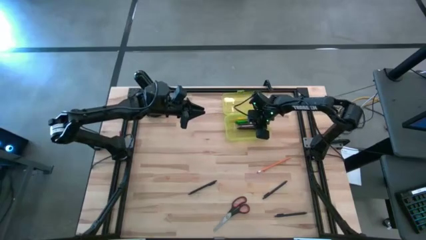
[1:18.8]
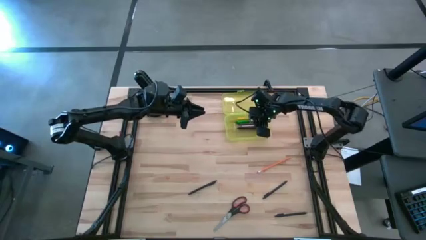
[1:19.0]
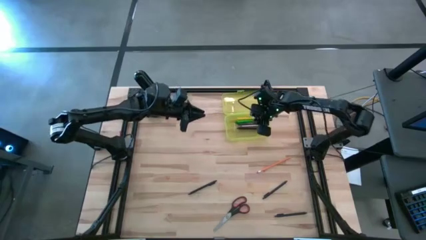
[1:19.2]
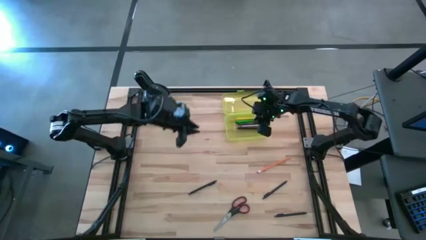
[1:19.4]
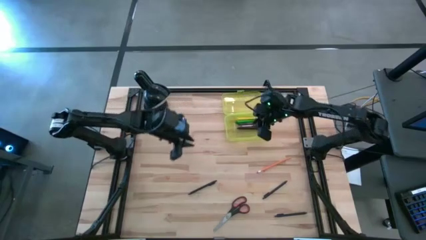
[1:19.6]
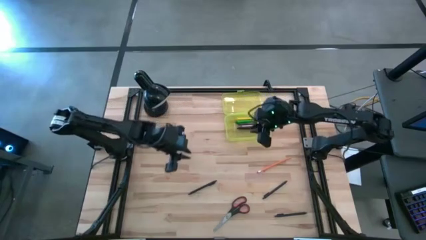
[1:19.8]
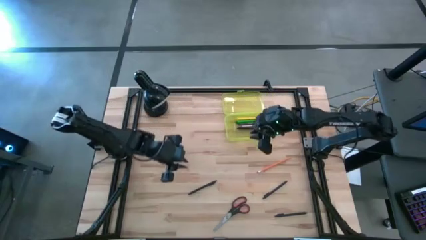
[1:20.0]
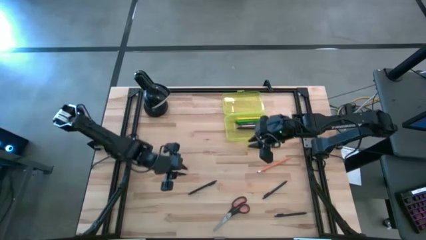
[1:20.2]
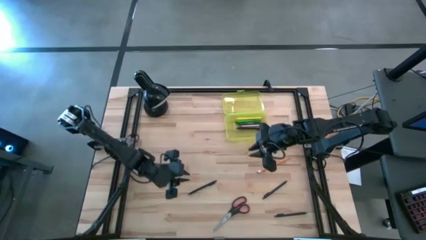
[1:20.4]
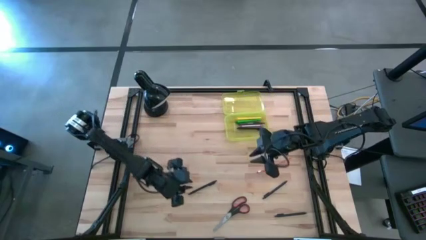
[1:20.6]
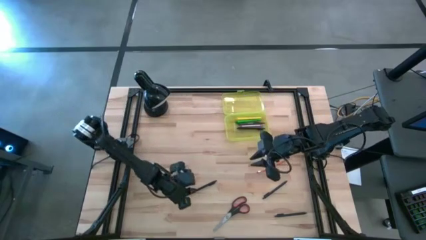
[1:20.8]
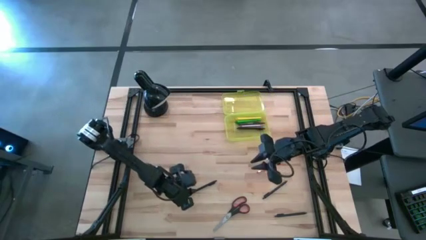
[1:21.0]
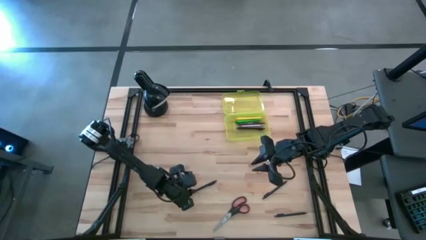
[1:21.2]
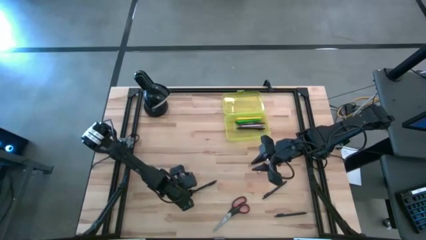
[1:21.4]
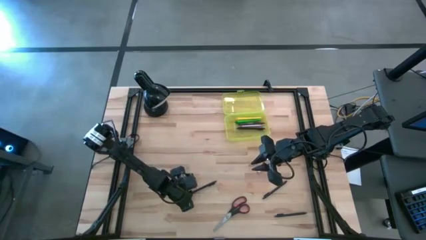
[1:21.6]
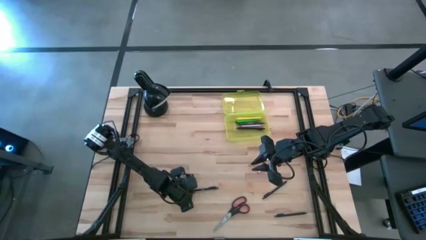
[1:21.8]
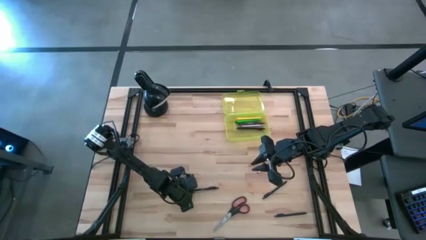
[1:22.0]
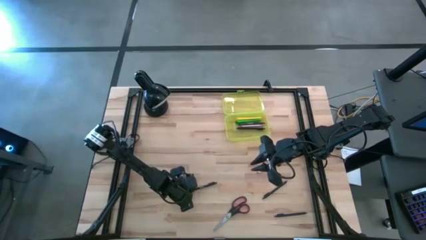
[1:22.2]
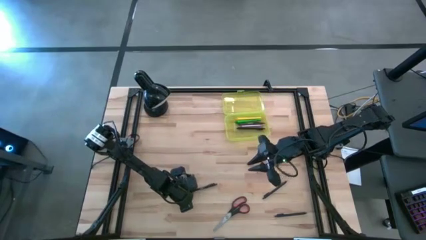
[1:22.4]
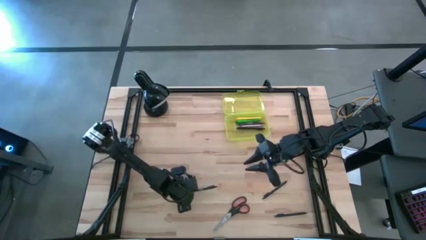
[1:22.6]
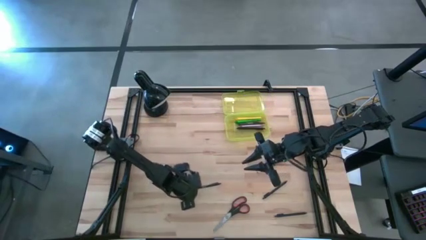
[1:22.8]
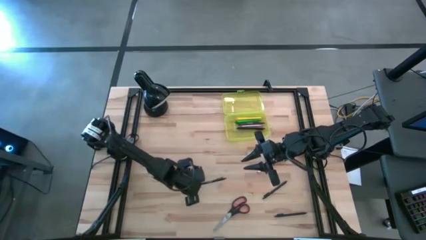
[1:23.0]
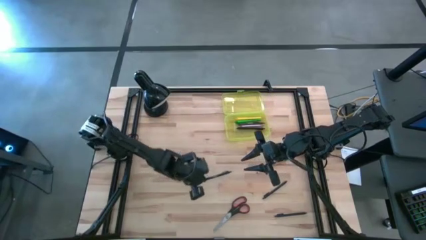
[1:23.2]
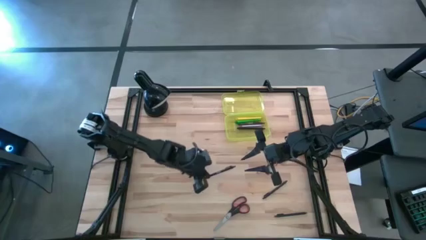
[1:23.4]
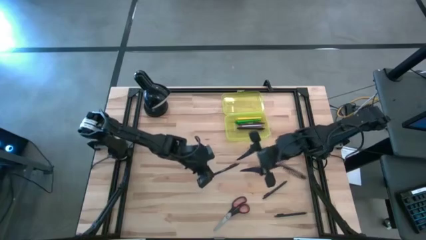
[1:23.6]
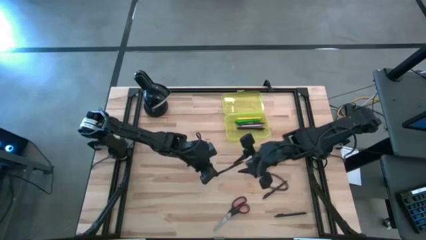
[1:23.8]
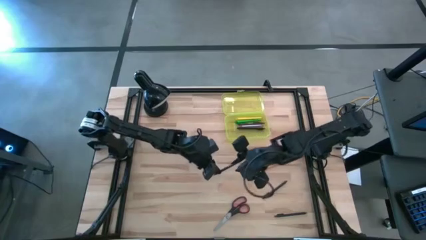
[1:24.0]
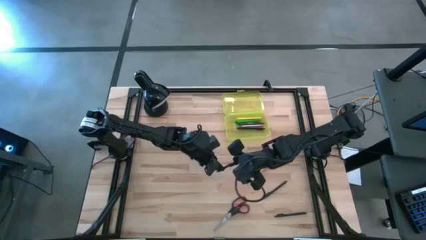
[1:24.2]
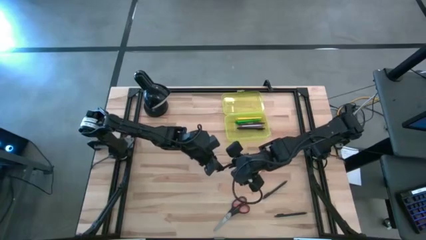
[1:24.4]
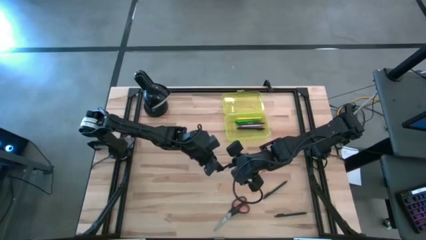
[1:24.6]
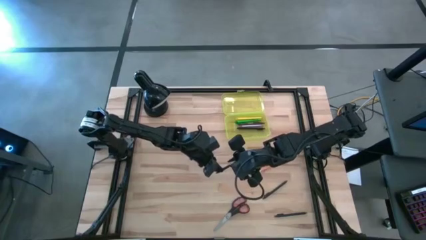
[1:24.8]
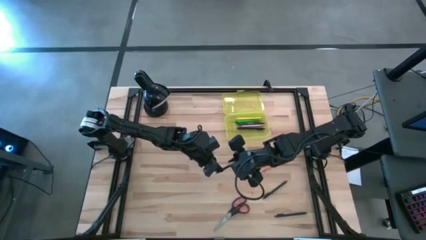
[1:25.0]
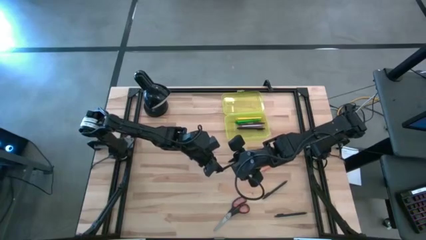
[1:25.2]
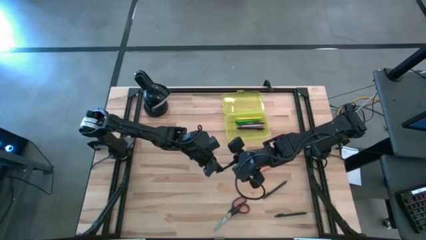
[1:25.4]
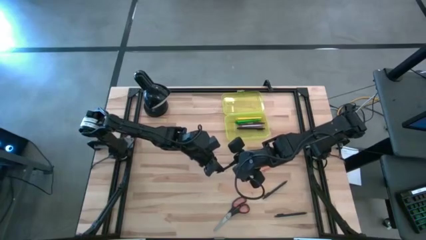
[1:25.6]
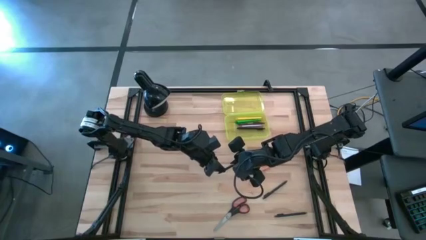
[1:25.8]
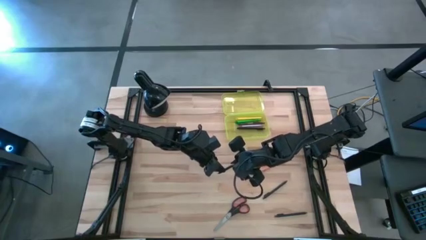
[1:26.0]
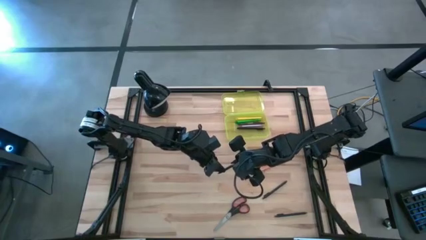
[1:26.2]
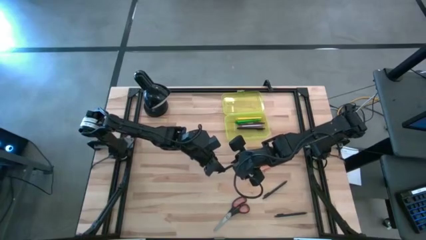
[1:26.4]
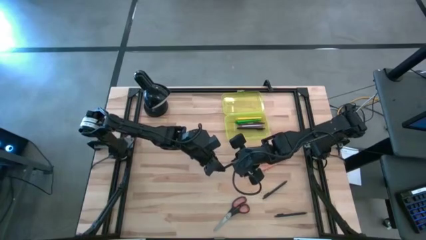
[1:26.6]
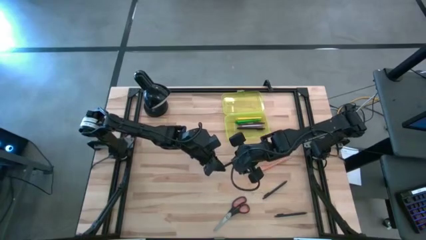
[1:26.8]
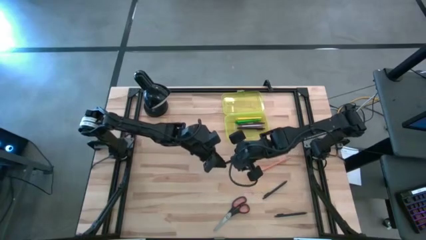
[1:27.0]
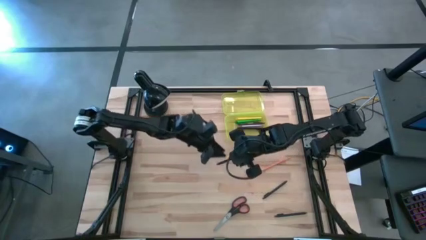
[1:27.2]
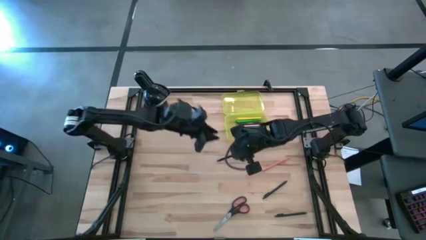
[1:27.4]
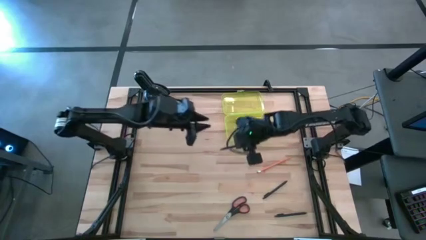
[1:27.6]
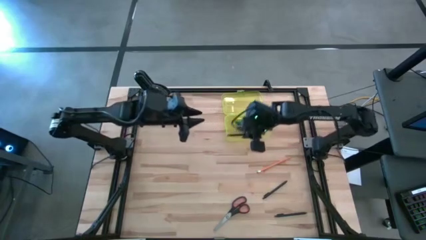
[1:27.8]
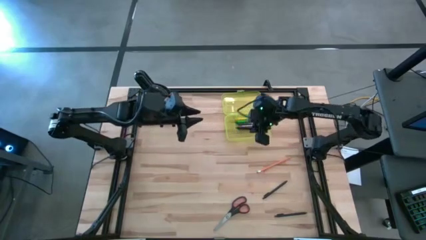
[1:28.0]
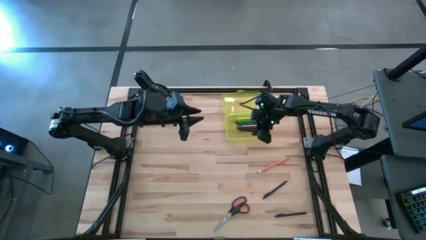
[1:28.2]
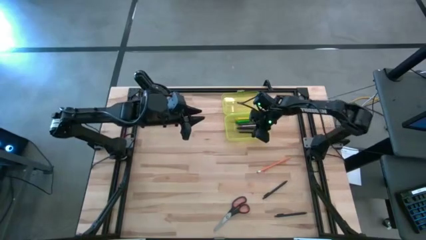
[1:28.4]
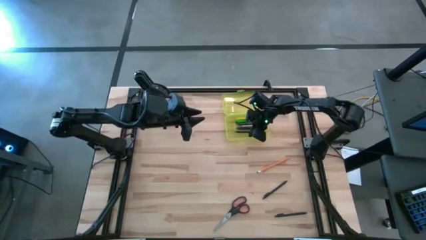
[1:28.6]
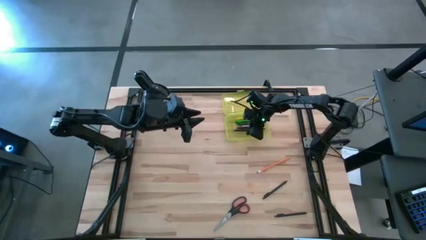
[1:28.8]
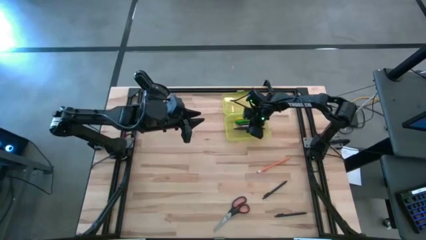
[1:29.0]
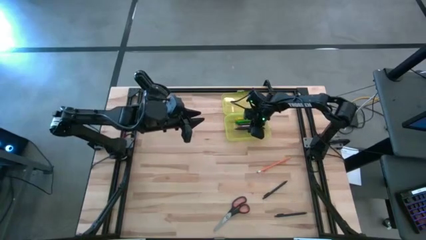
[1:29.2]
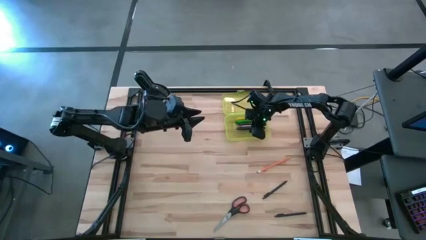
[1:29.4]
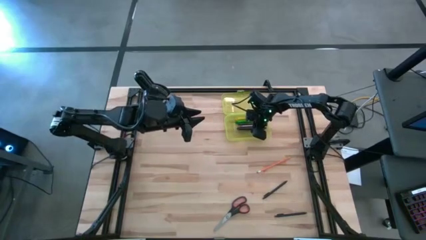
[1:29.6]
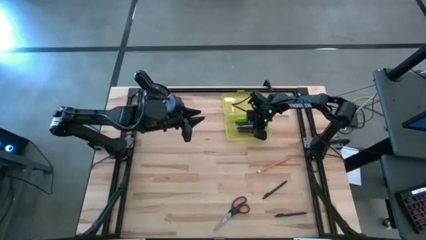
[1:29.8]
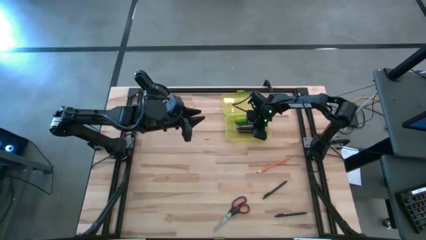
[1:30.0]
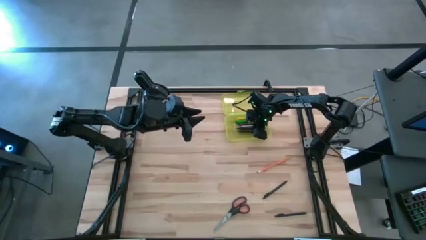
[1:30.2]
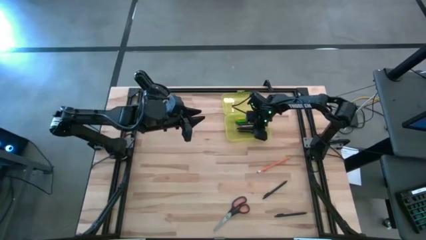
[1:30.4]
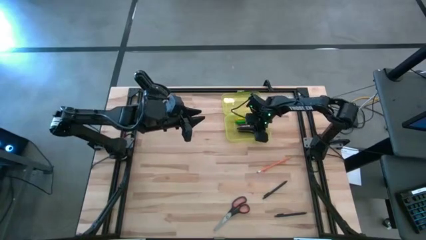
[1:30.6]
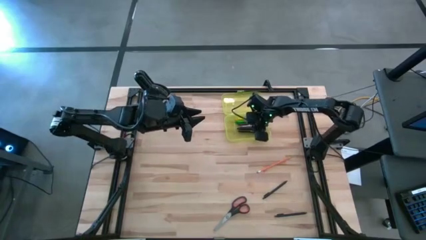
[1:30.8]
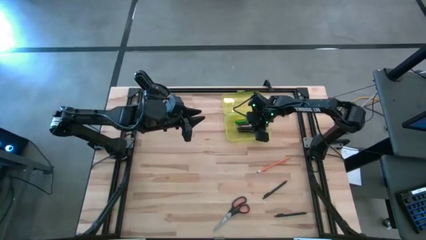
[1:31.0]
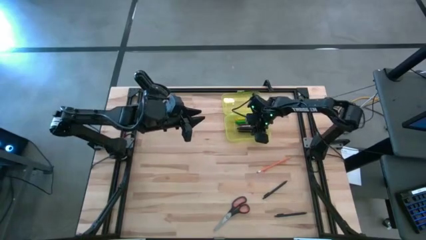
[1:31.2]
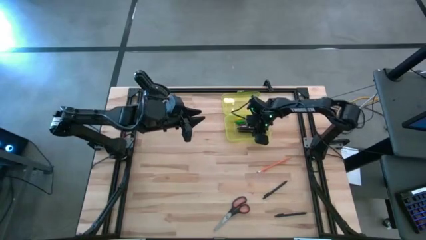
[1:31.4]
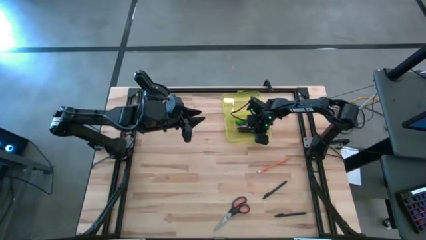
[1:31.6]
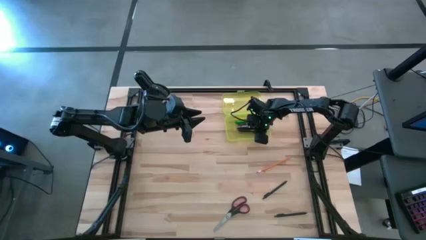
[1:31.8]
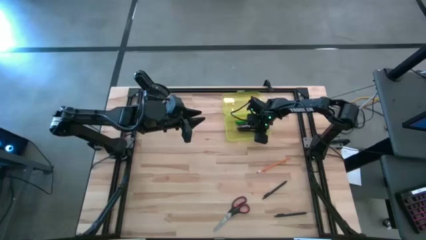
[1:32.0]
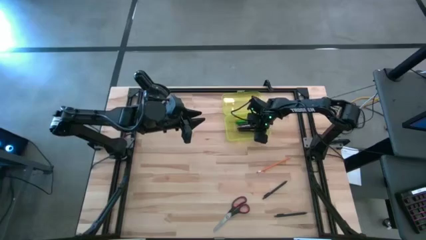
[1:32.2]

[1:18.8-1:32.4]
Task: Pick & place school supplies into a supply box
Put the black pen into the supply box
